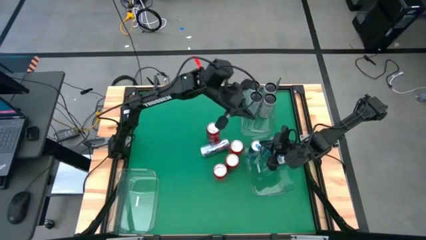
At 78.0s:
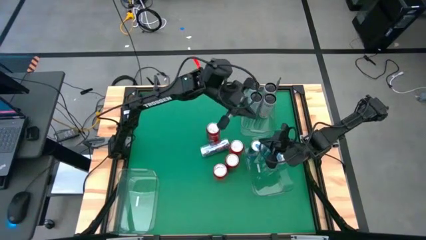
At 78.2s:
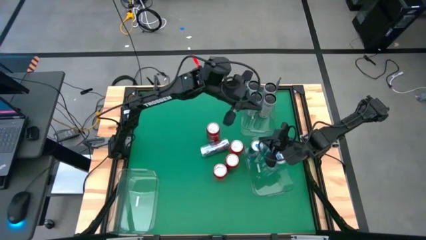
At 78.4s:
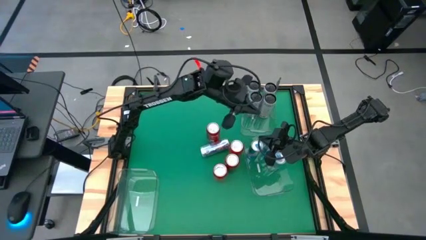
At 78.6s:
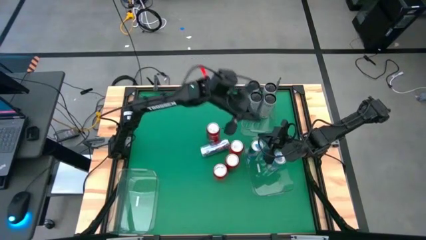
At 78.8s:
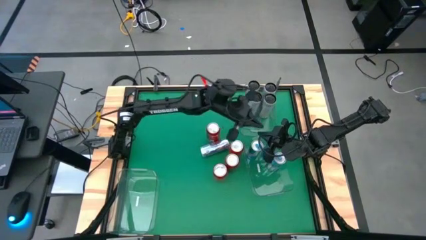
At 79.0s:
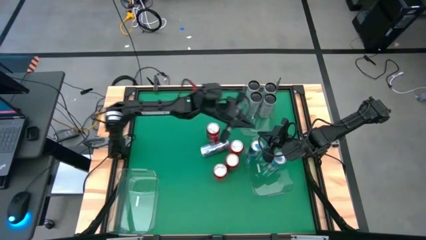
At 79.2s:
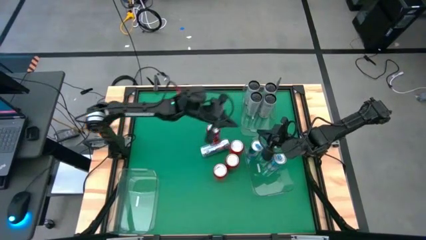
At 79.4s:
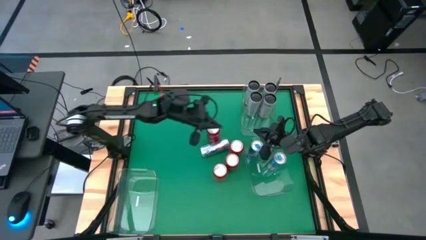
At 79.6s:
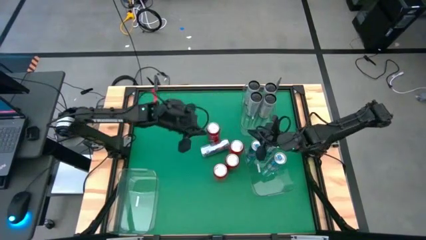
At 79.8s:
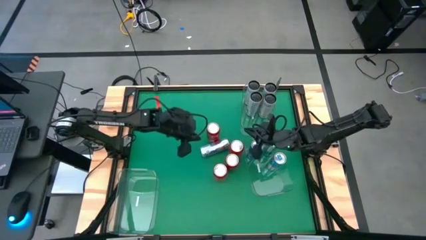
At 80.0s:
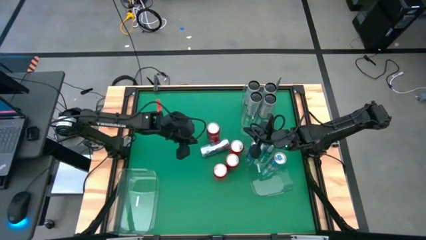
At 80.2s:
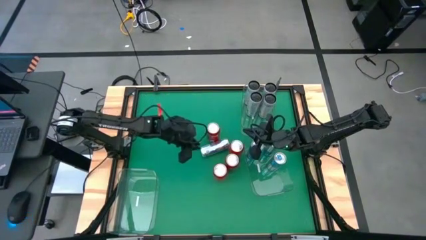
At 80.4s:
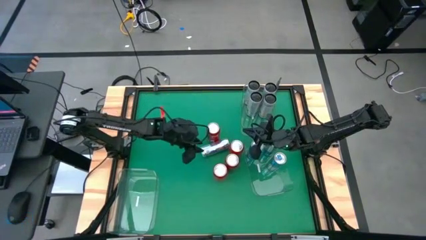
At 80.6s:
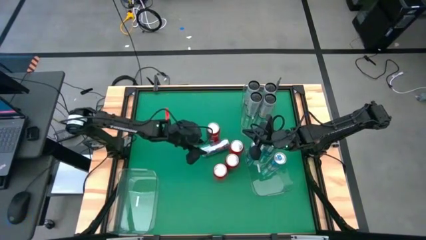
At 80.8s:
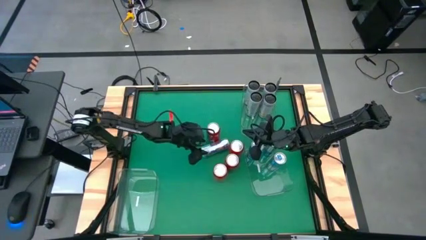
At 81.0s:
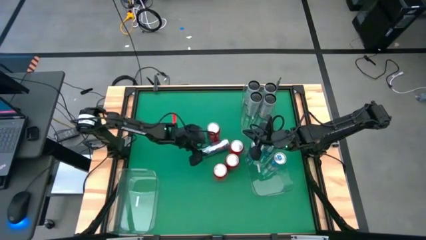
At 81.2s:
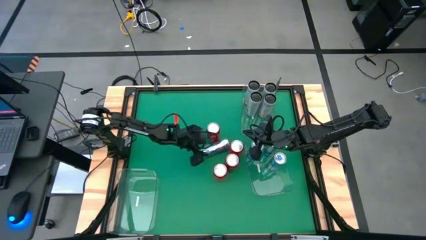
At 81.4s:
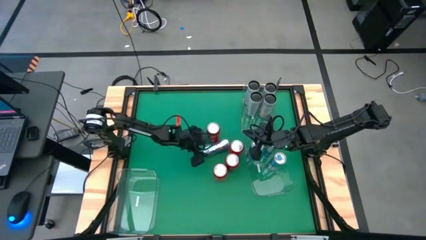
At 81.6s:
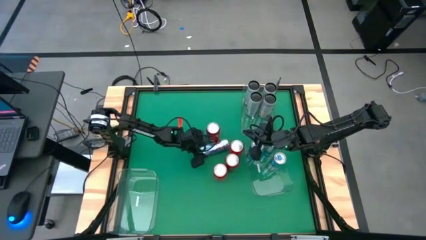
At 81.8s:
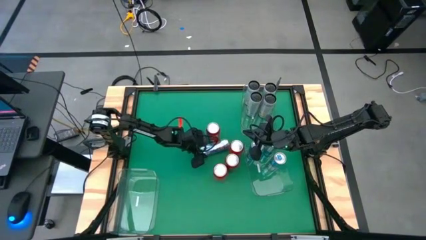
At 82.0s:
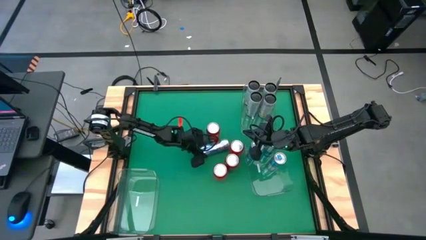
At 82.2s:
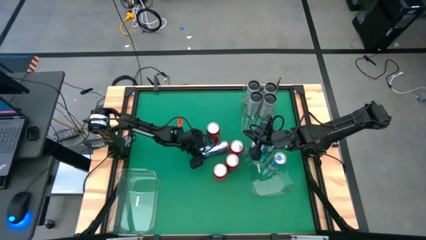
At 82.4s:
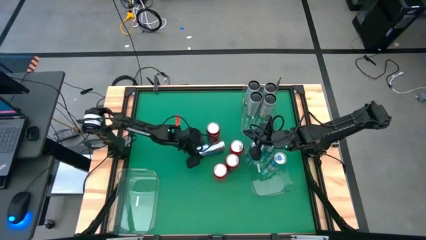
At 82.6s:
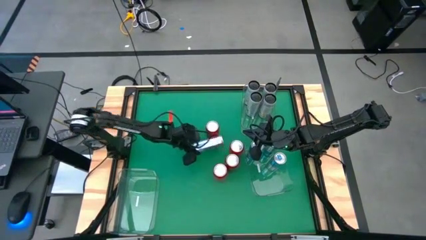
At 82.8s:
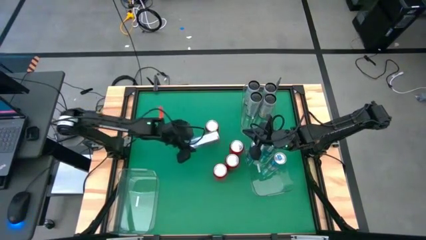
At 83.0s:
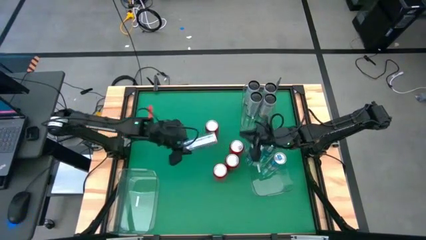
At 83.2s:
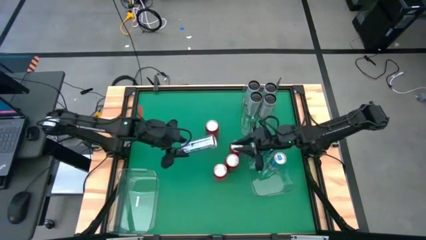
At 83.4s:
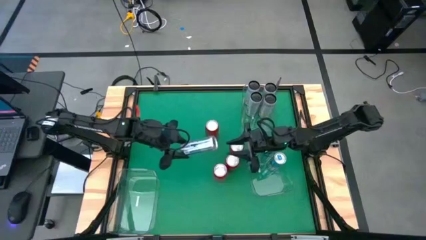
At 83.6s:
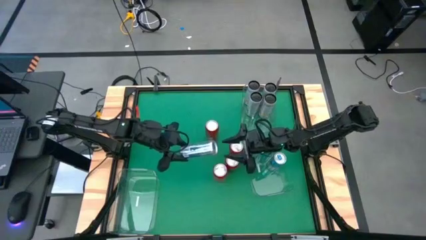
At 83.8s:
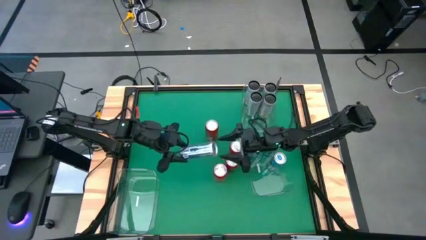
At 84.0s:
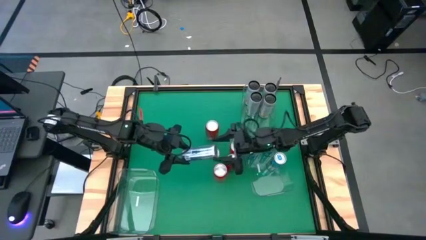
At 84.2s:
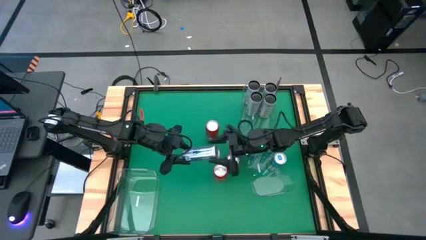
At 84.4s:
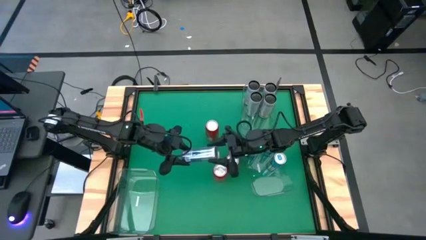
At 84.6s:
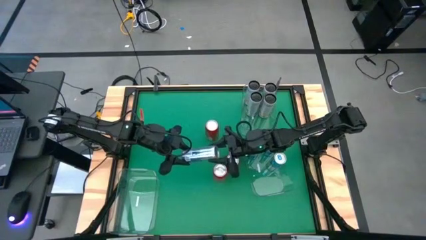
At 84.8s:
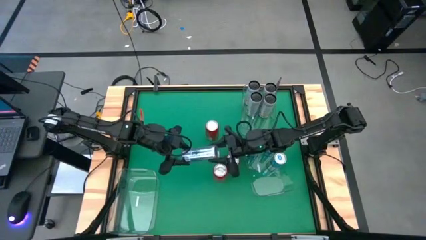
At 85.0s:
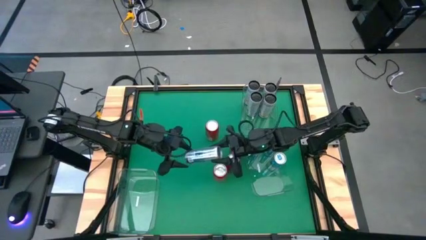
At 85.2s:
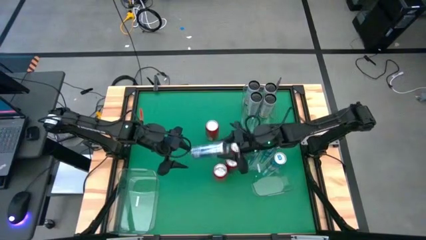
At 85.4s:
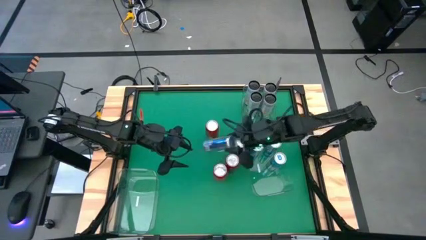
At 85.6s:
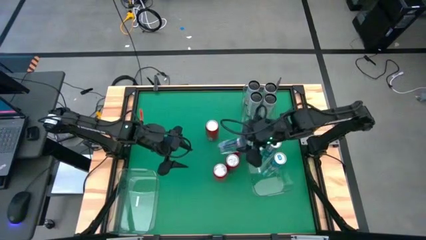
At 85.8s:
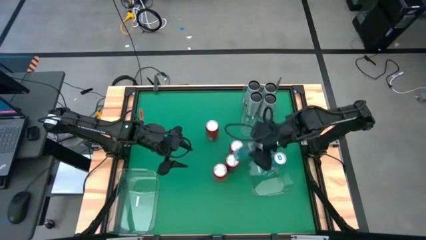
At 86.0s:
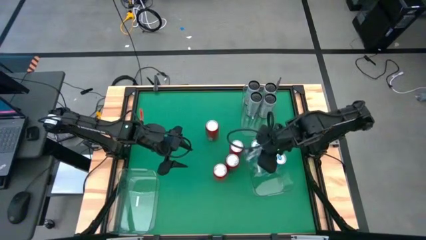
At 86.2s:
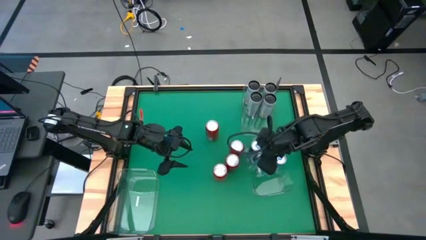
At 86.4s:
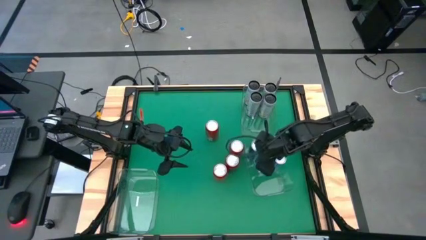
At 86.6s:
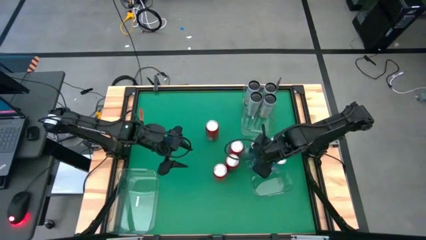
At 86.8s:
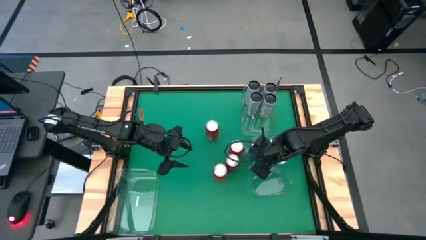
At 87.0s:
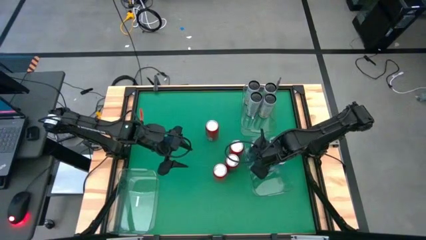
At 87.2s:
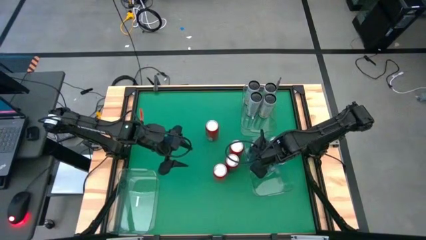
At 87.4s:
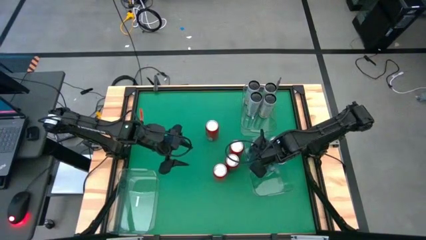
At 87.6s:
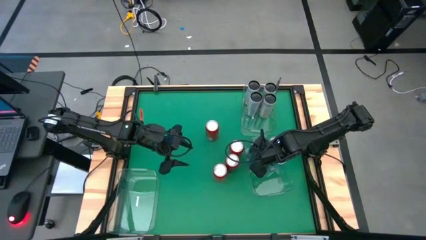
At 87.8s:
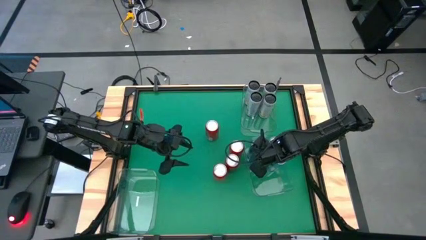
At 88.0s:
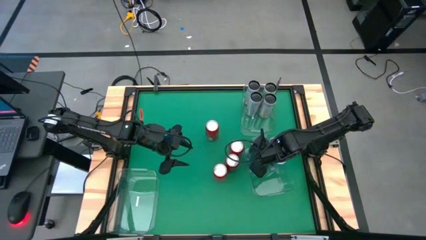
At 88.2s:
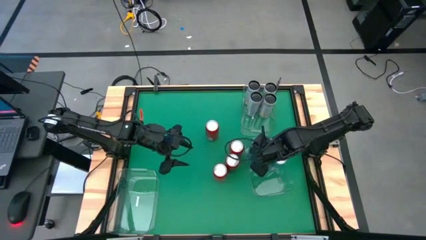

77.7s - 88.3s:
Task: Sort soda cans
Put the blue soda can into the bottom right transparent bin

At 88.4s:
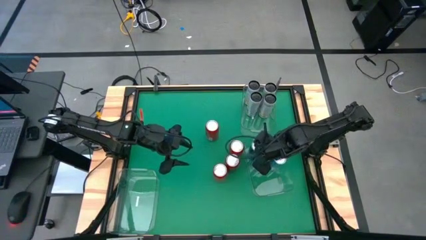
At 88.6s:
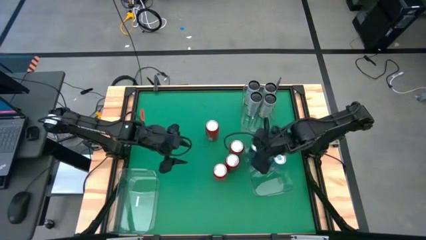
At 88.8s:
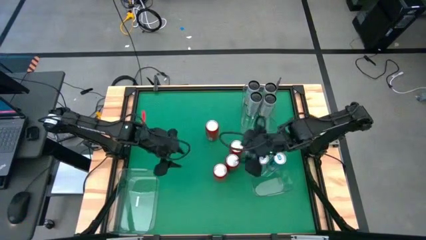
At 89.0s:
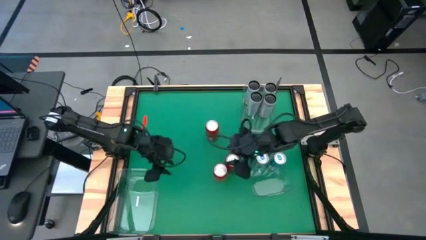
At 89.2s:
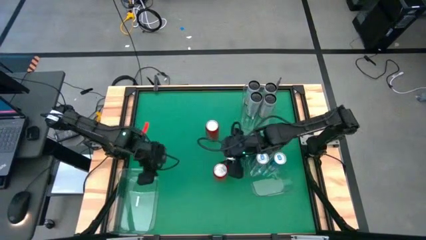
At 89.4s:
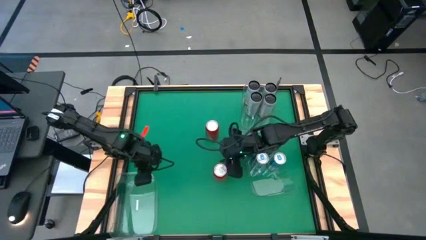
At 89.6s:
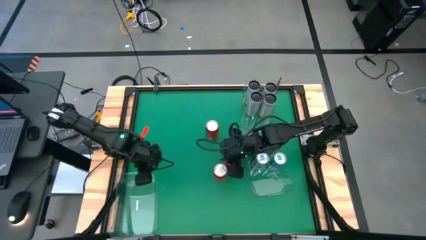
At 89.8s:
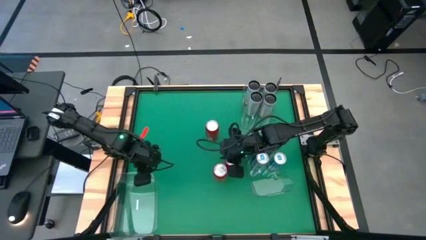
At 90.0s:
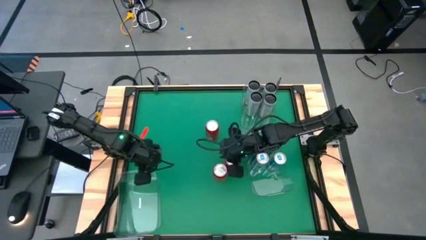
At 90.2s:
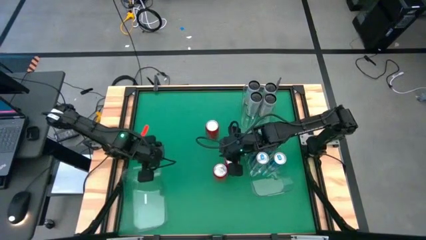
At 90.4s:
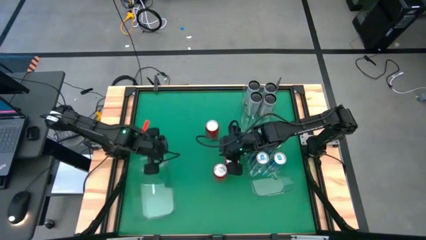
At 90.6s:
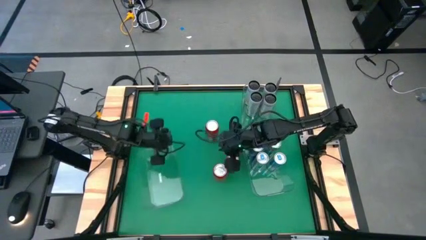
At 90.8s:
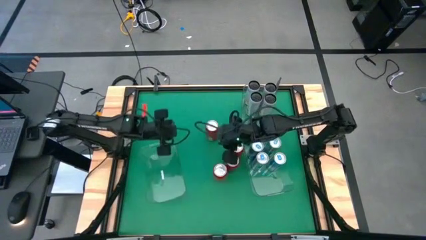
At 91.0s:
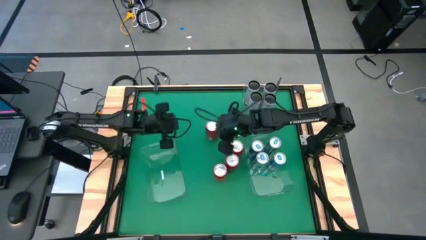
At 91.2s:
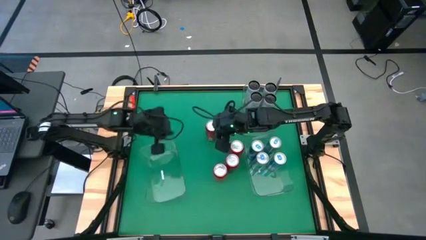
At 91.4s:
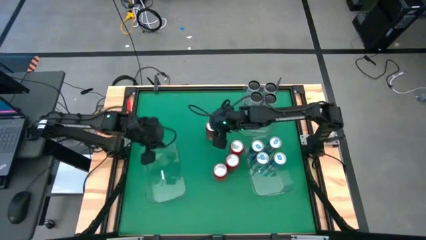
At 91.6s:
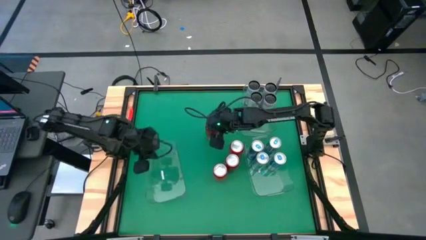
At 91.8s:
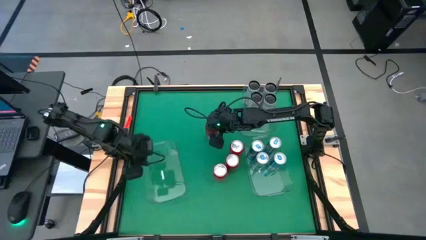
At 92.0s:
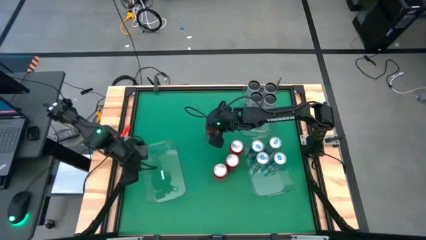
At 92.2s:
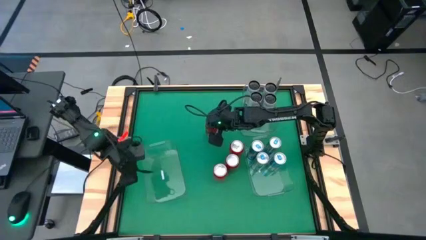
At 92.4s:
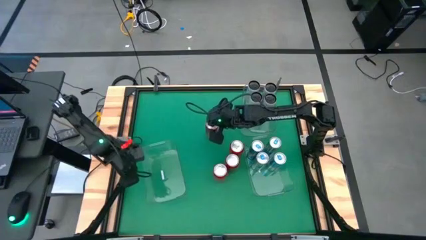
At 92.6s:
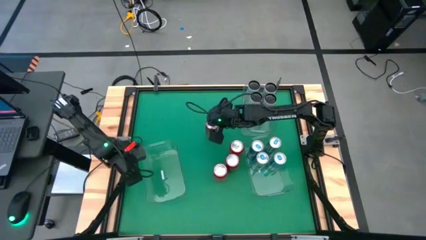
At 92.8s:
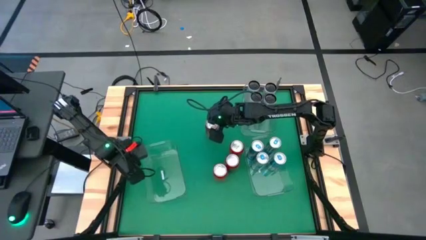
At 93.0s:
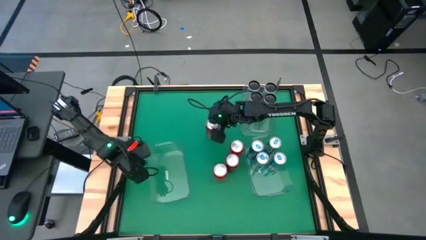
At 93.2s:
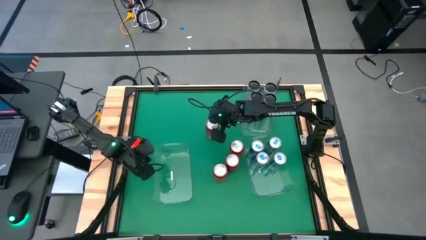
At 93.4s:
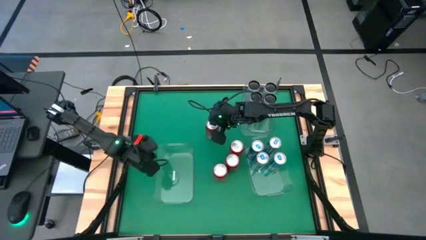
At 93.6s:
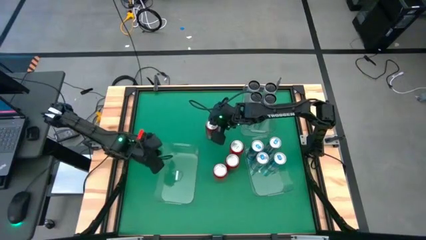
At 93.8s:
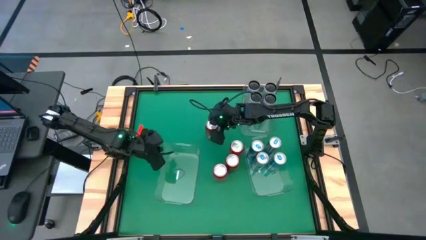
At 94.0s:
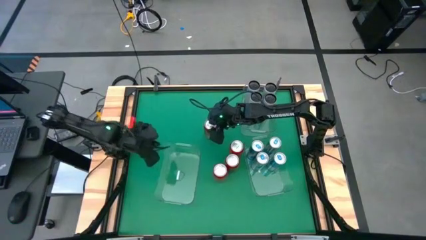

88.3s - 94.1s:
Adjust the bottom left transparent bin

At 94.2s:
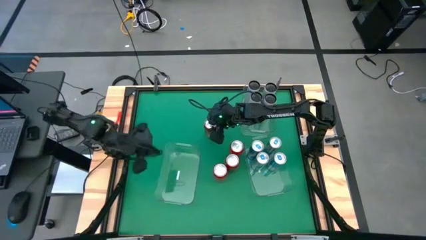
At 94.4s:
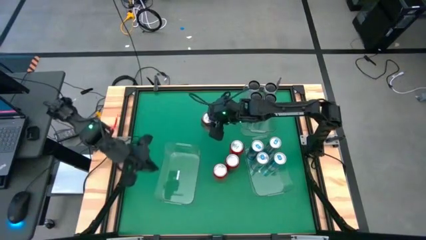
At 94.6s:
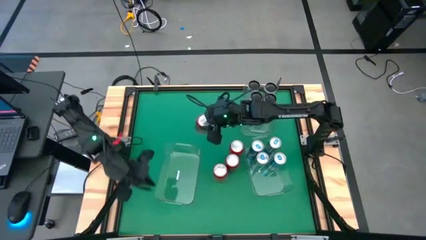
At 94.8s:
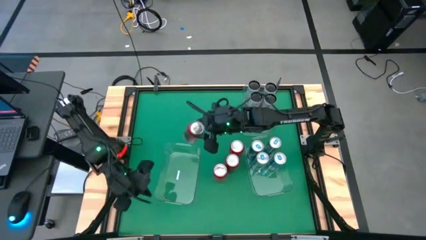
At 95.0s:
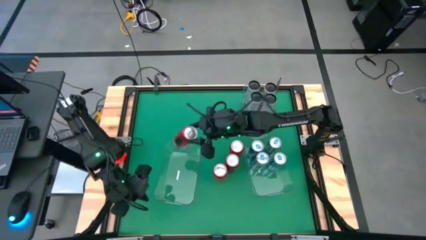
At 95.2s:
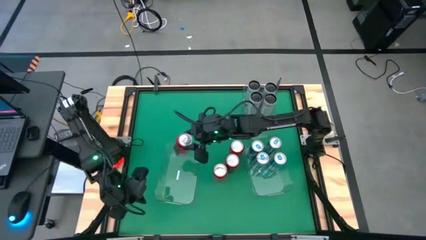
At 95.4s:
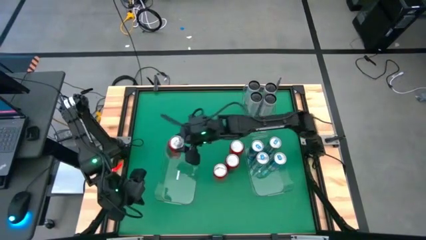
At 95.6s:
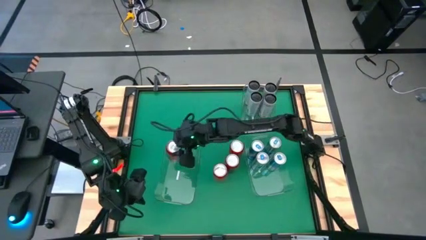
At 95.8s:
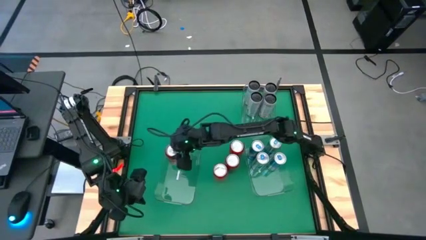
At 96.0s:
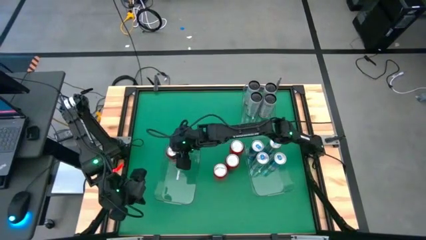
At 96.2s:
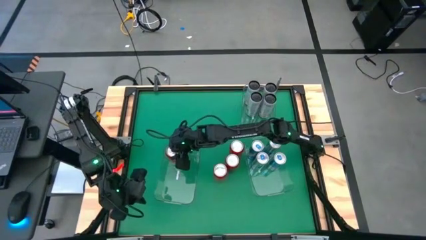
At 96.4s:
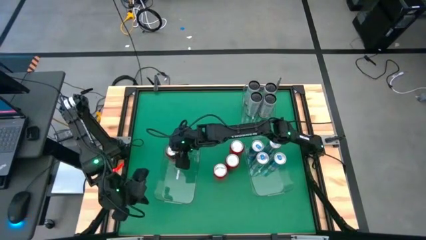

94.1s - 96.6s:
Put the red soda can into the bottom left transparent bin
